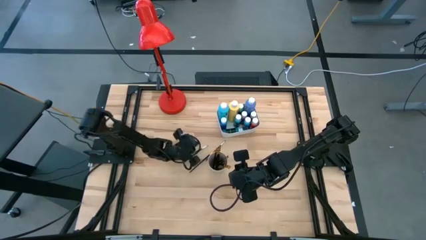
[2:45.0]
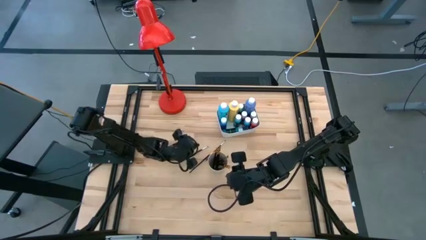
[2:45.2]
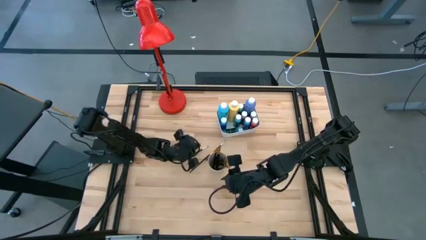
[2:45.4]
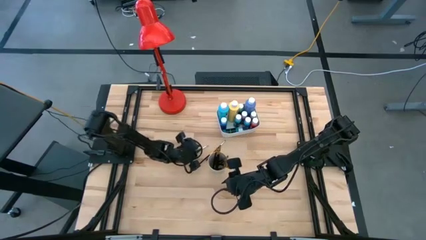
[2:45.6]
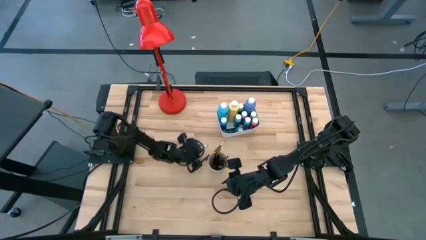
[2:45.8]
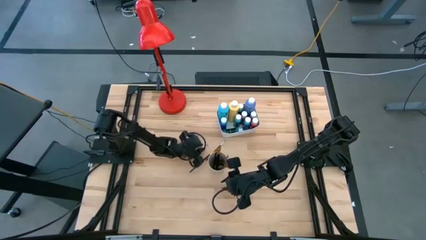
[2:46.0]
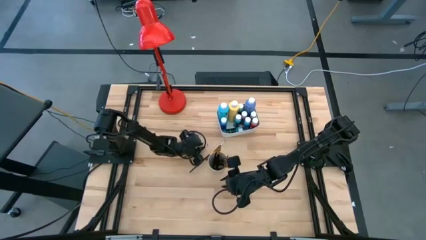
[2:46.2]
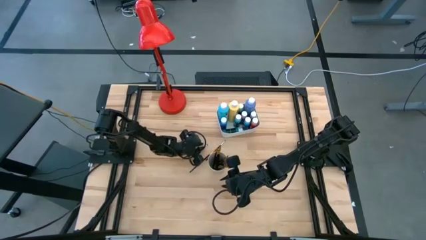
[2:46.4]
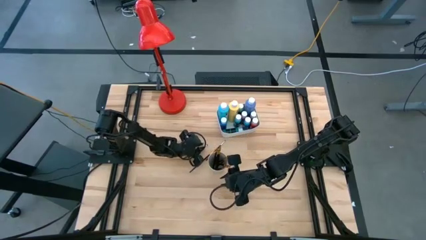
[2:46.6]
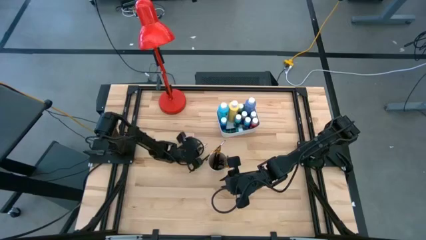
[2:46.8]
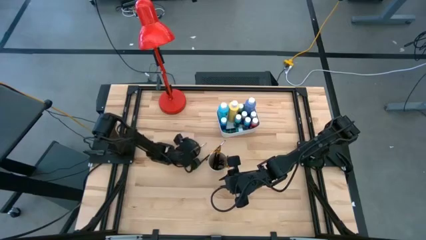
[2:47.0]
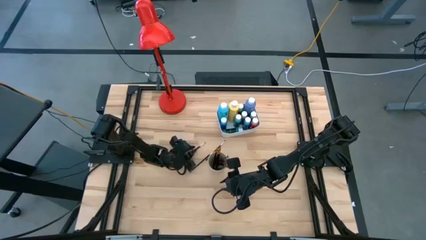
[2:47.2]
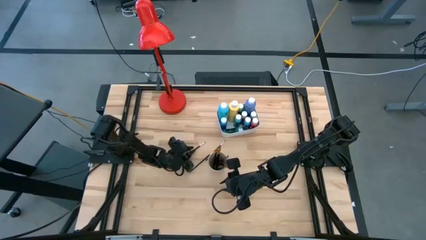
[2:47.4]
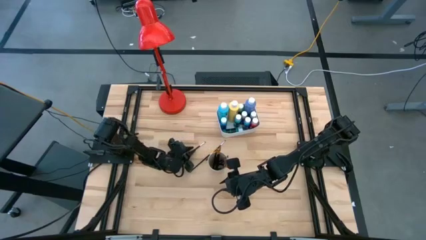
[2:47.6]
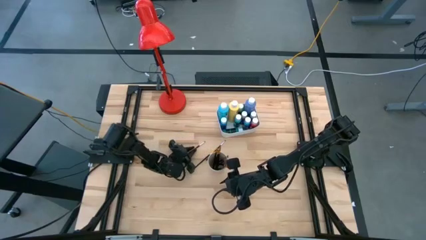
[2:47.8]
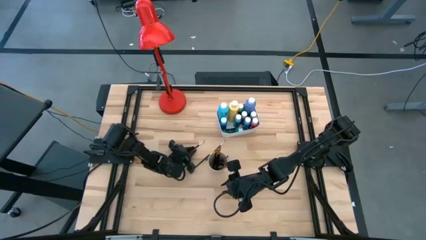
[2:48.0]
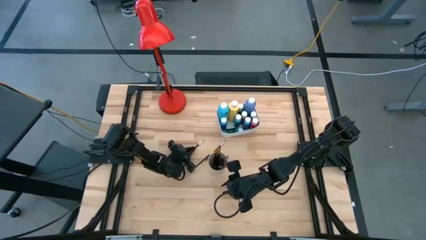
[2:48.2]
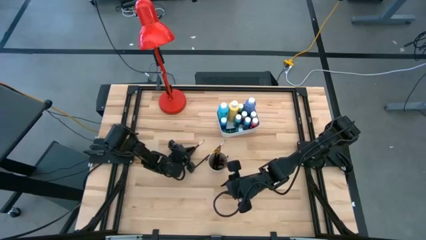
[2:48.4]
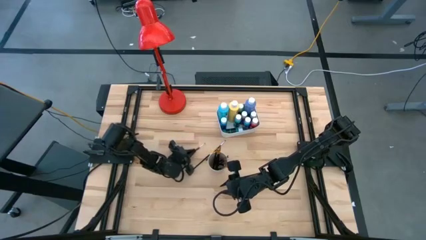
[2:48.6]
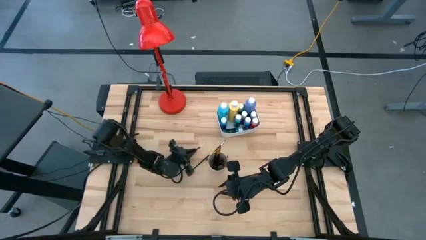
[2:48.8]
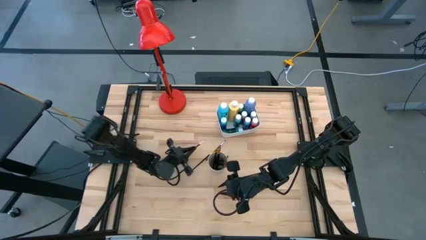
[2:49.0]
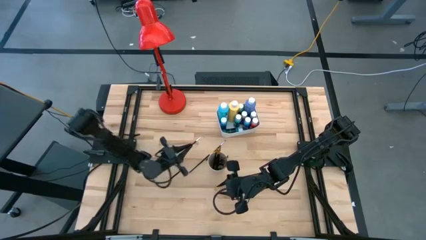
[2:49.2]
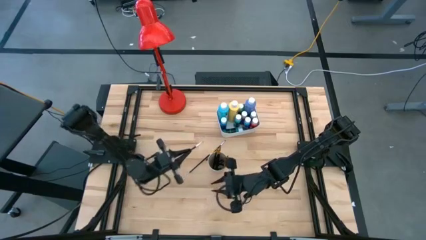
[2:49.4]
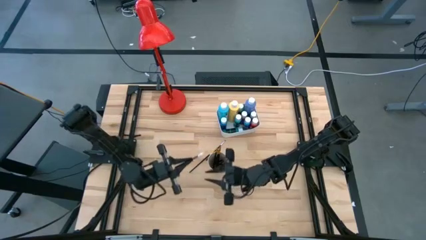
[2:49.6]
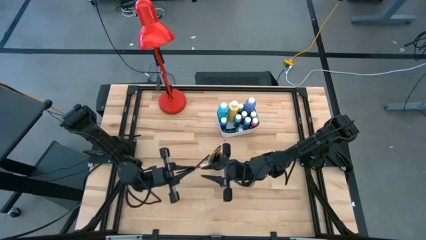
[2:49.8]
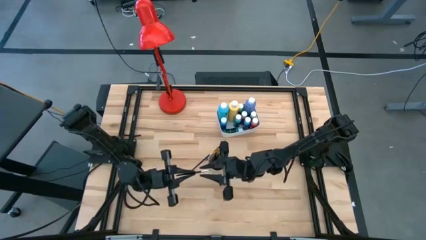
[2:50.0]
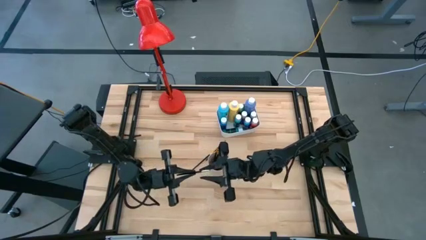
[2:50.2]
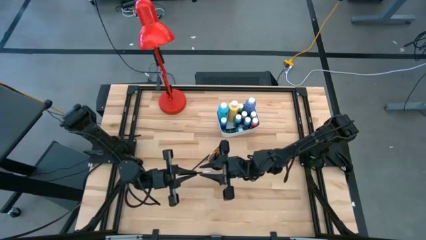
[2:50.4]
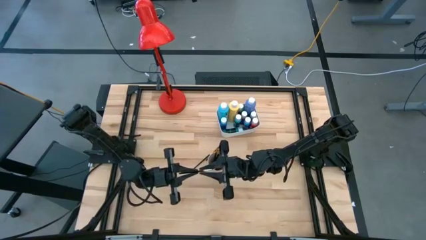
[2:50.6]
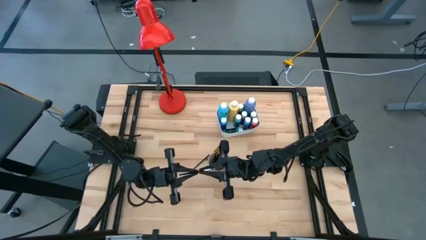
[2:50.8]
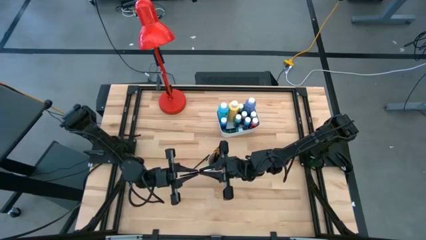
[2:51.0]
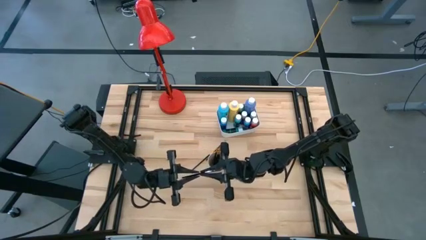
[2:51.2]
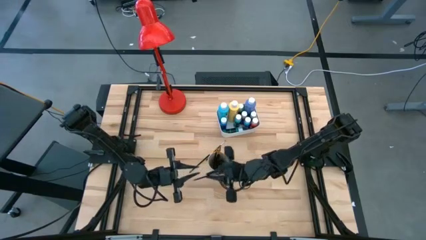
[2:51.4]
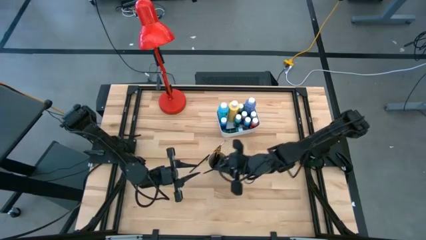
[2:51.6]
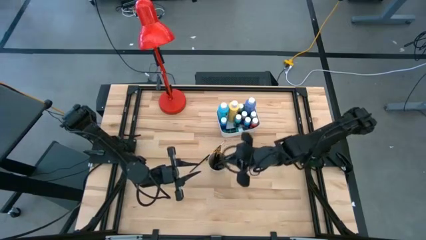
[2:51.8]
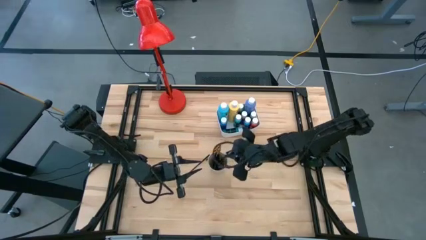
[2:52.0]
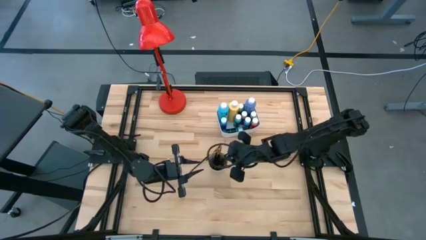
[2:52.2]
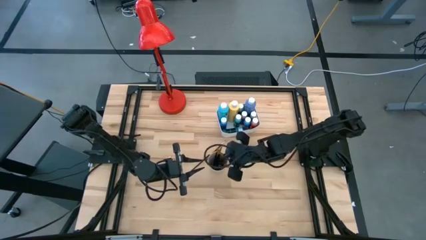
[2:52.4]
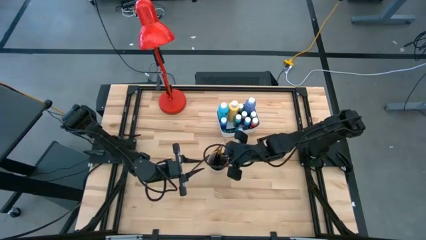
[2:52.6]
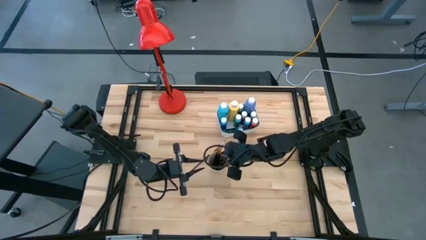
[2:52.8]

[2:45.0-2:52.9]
Task: Pick & Place Paint Supplies
Put the silver paint brush into the white cup

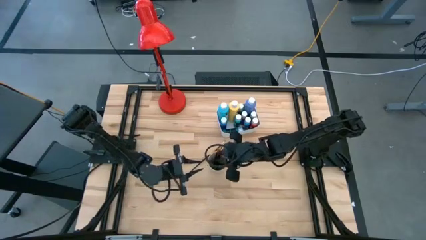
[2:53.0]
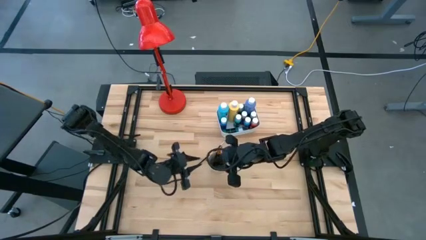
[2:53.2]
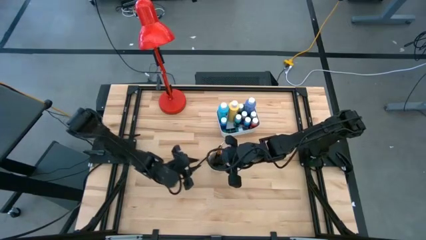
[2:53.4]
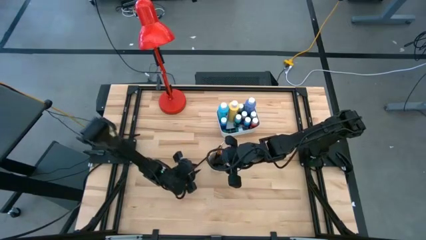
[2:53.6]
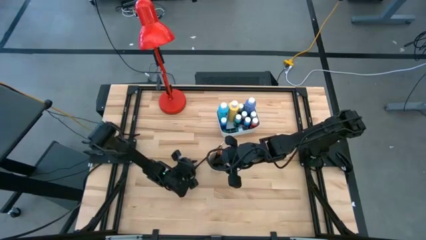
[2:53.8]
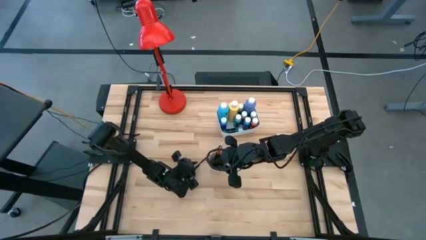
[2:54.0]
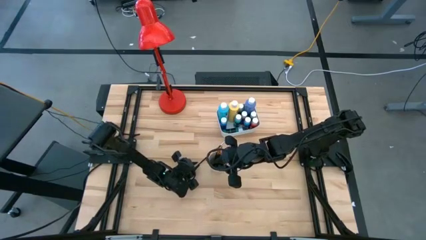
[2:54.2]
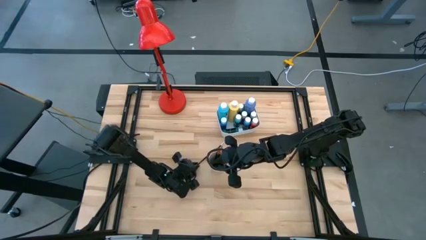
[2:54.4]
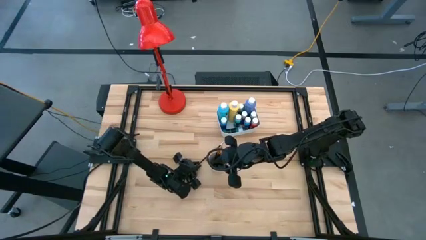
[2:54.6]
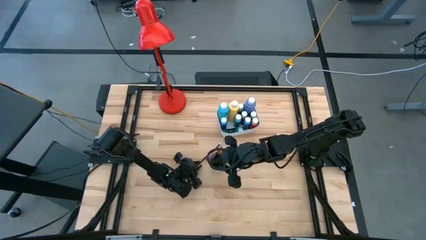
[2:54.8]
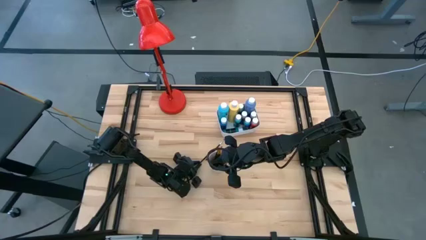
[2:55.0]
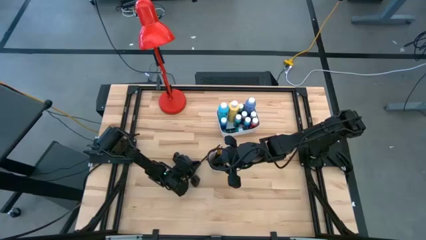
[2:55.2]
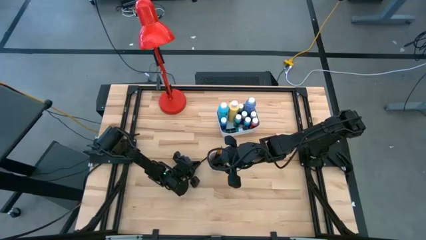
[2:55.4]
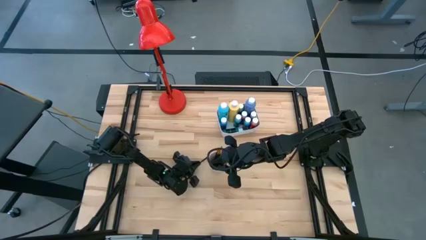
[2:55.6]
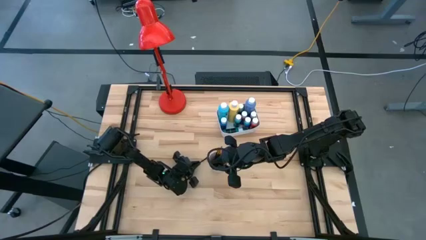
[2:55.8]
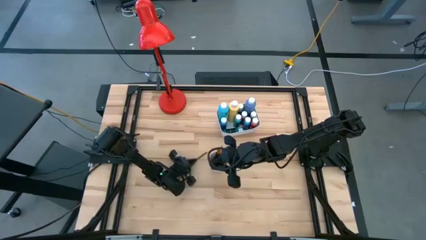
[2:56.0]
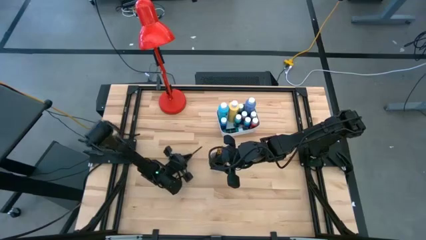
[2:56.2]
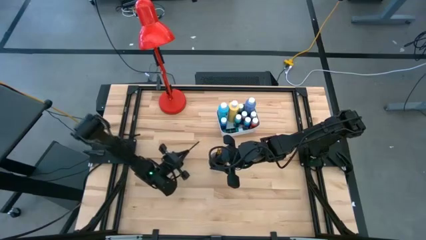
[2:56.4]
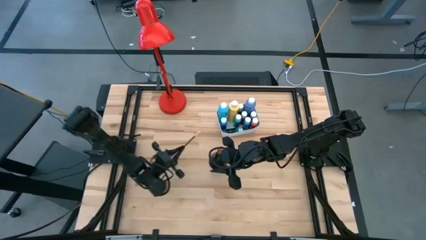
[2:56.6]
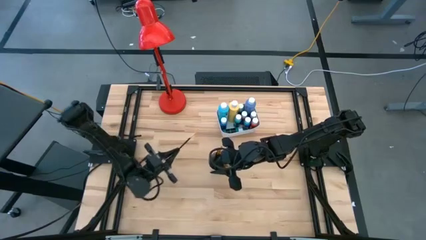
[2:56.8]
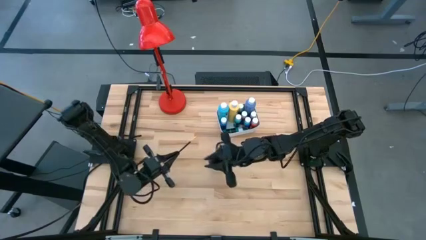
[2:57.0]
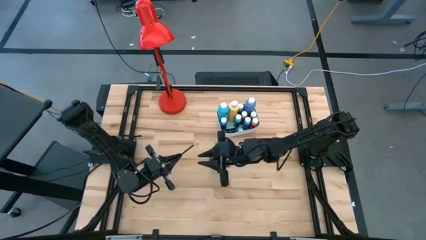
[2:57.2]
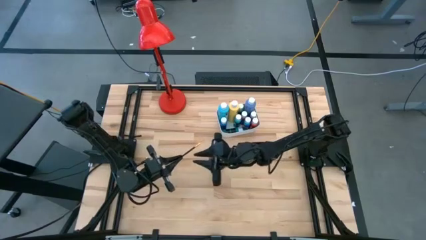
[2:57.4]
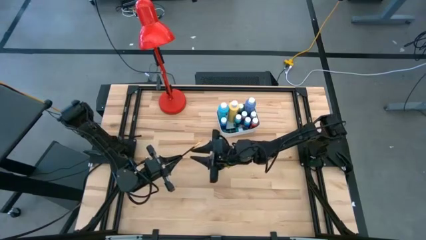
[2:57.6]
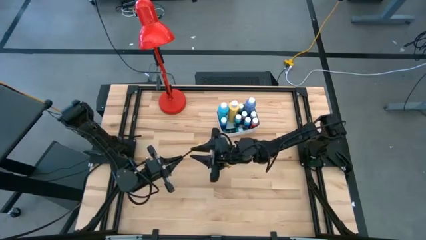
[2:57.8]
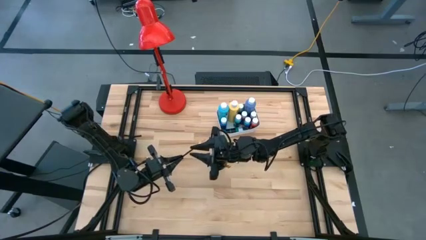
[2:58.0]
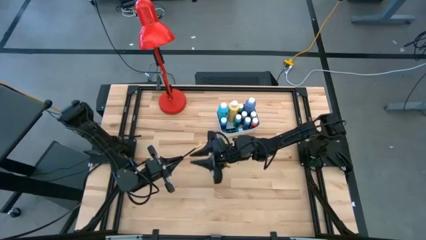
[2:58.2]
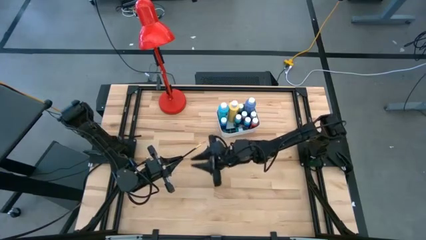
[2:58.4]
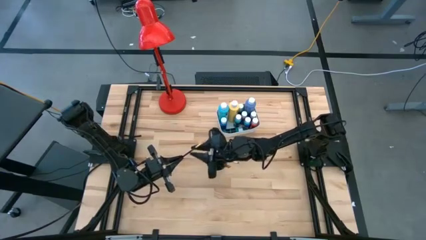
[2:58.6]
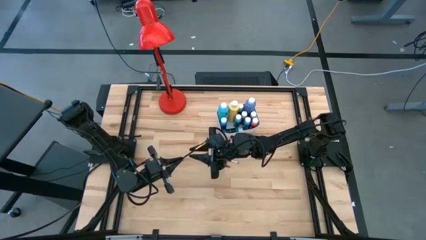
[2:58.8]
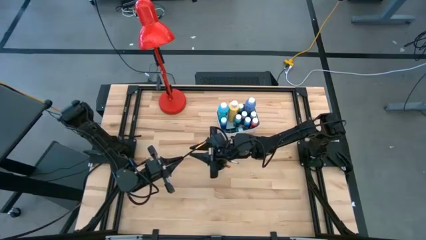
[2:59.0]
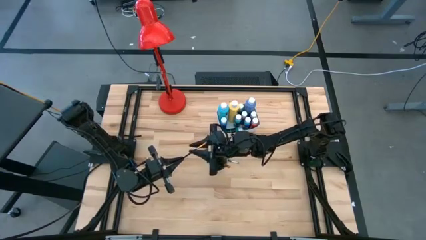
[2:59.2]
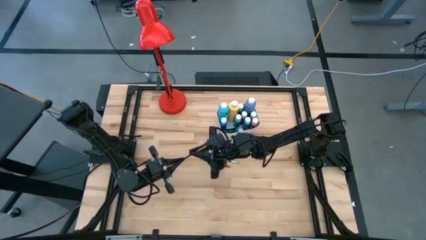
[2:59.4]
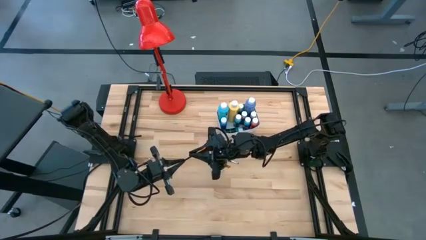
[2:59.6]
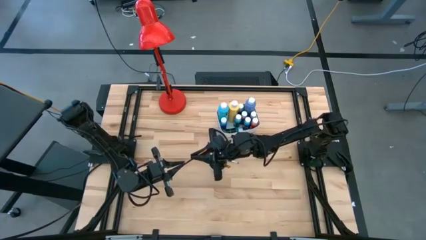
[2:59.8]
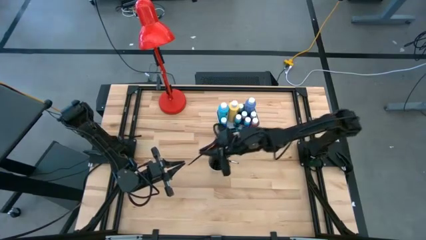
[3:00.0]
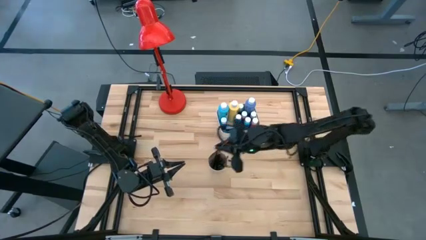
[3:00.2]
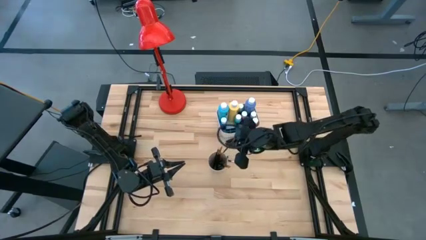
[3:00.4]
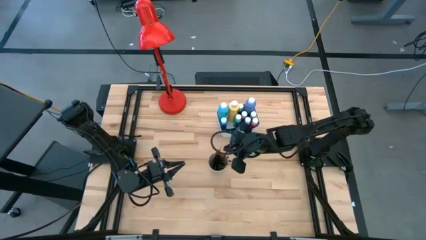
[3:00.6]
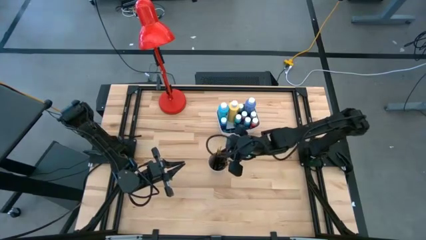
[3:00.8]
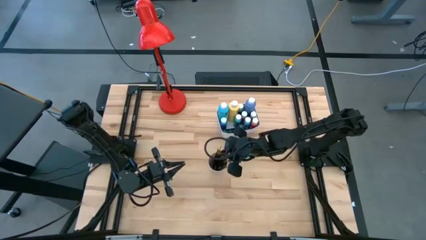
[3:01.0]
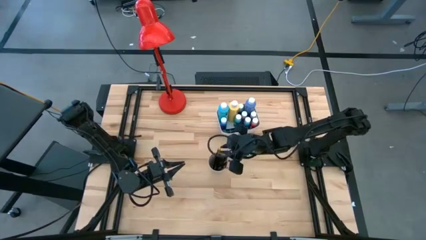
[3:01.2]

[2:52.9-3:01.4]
Put the gold paint brush into the white cup
